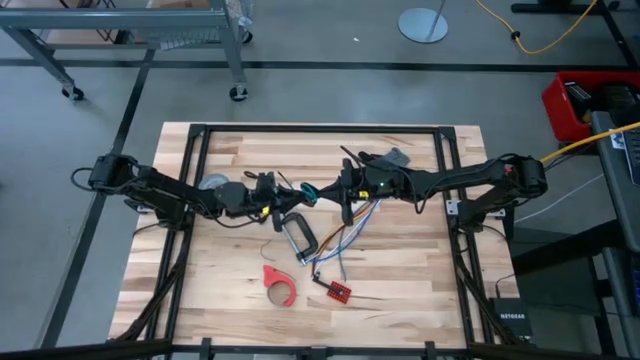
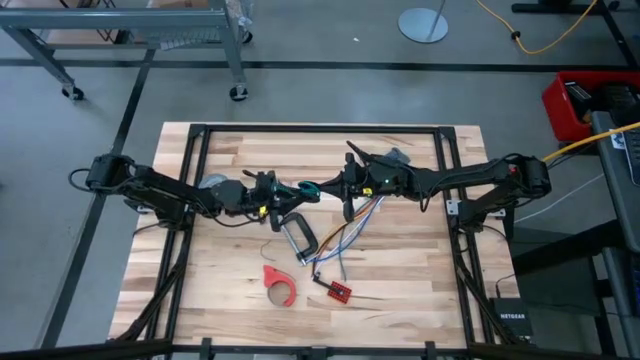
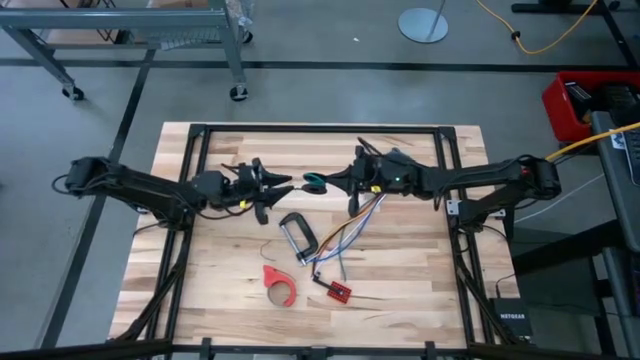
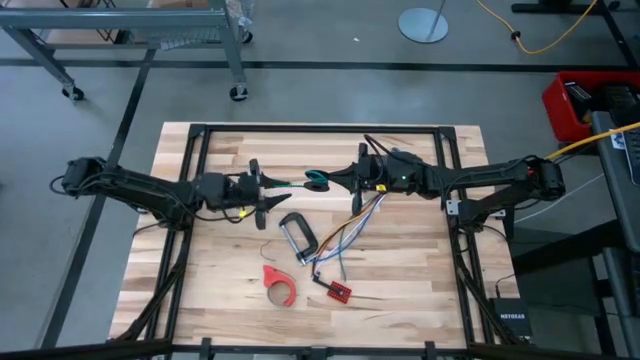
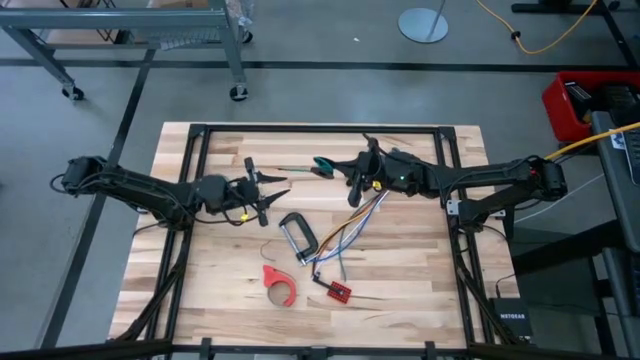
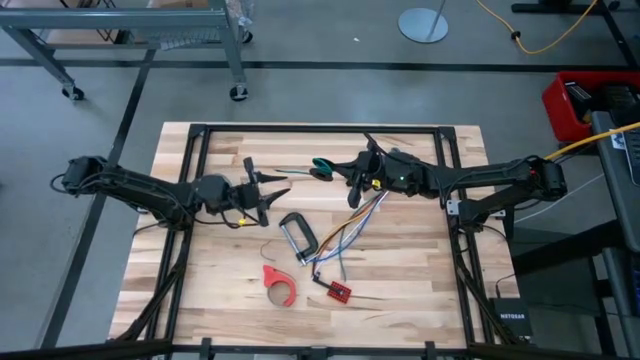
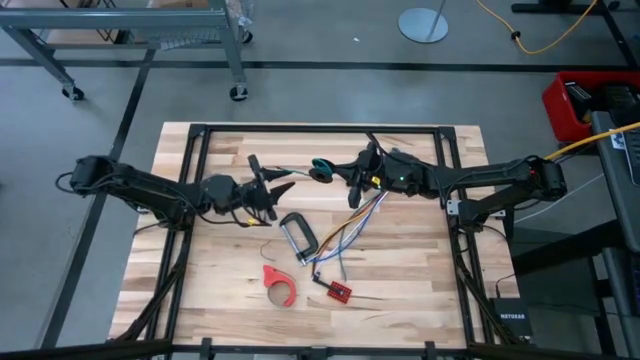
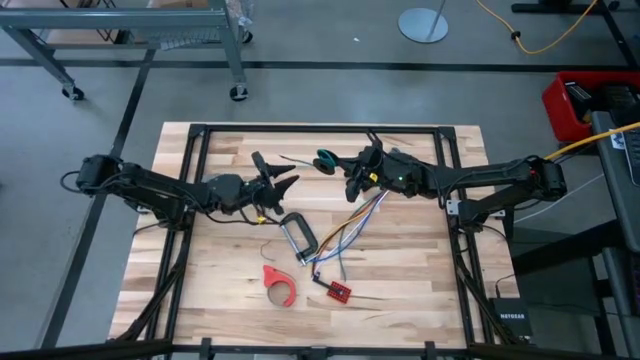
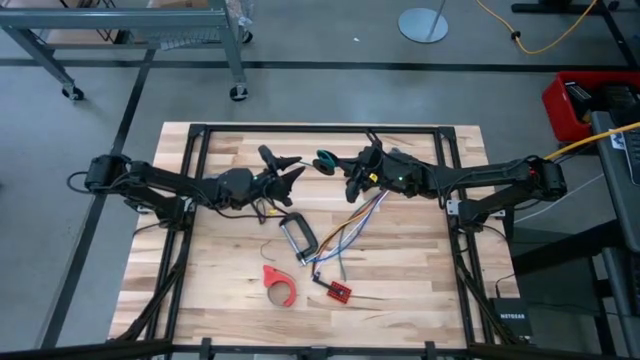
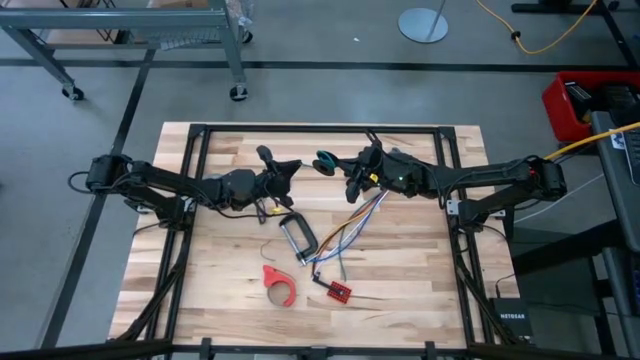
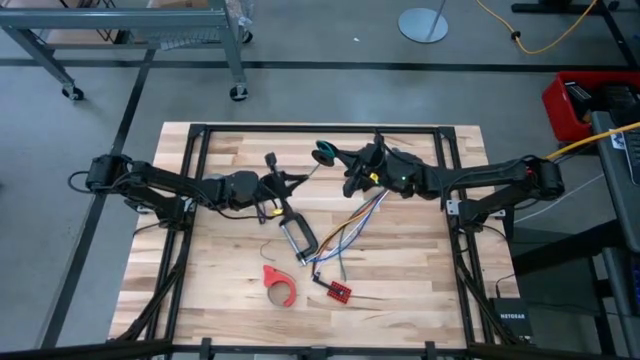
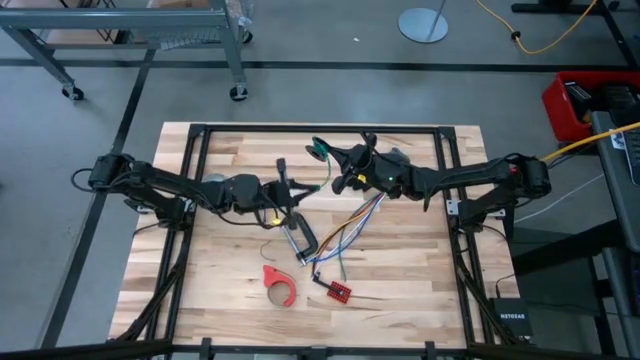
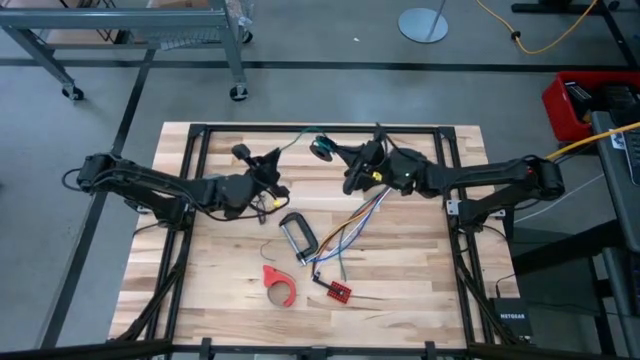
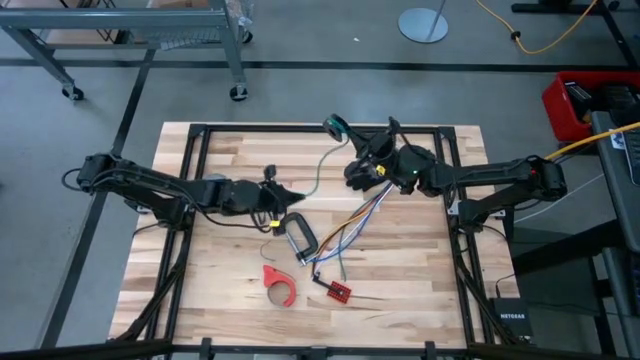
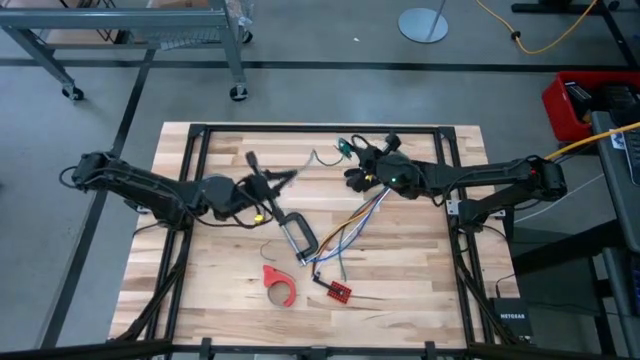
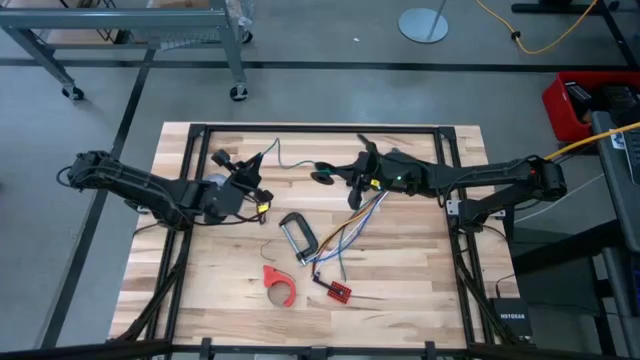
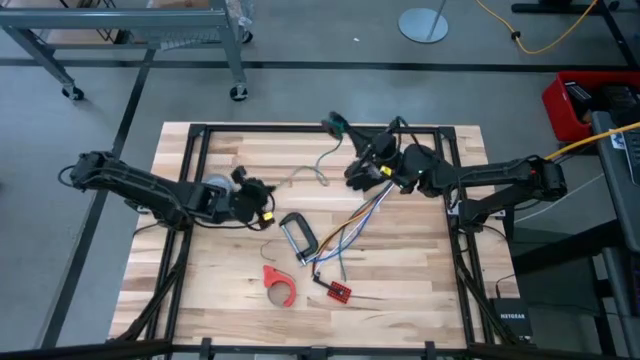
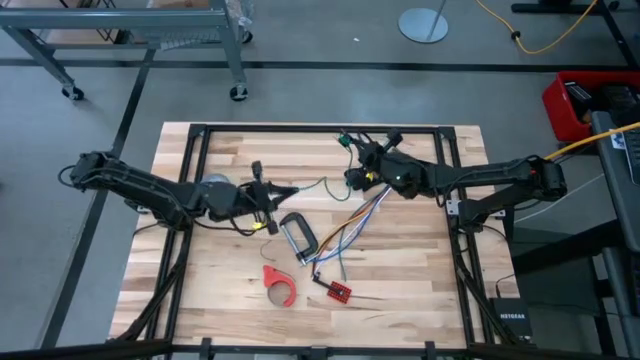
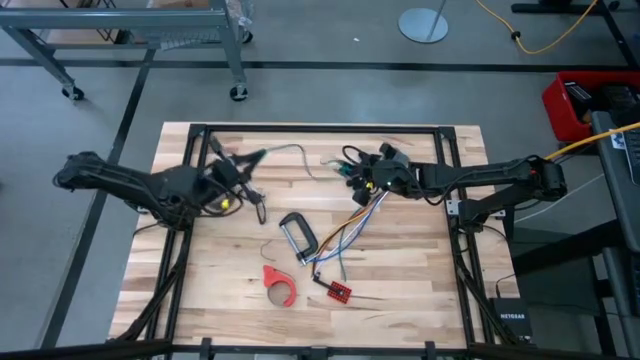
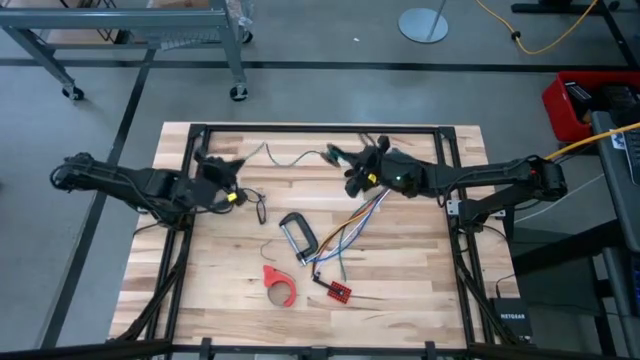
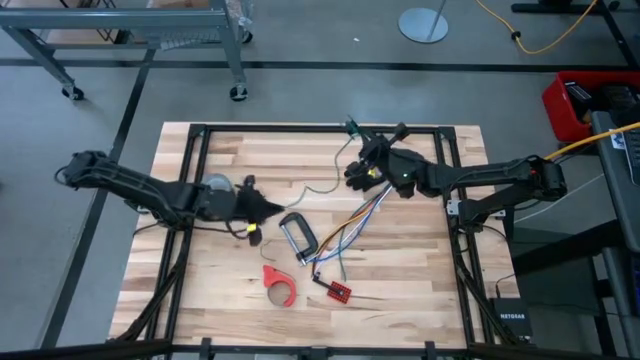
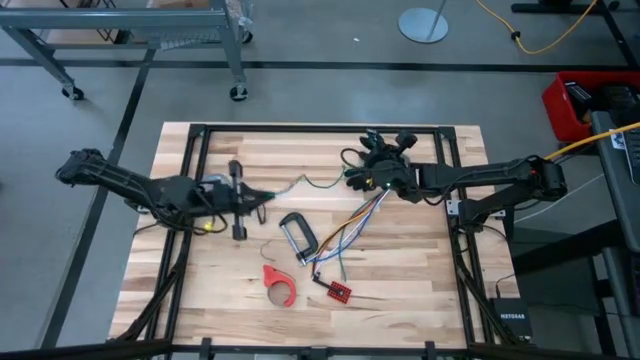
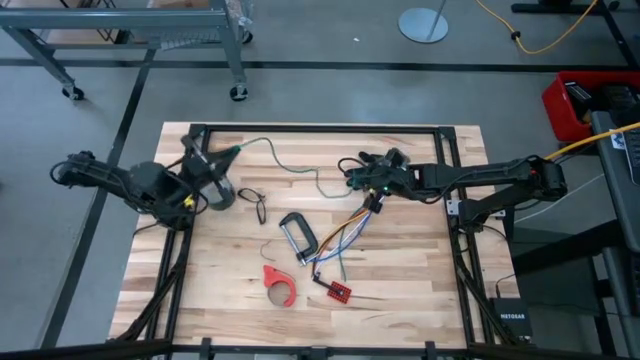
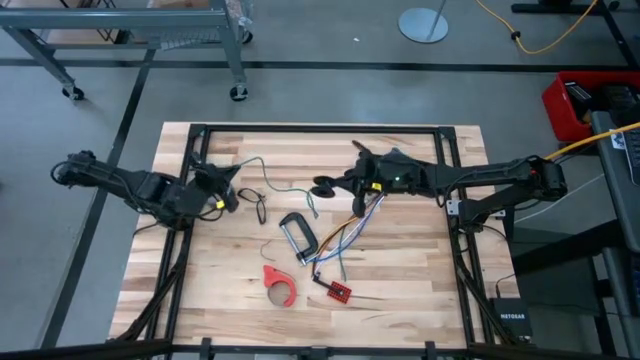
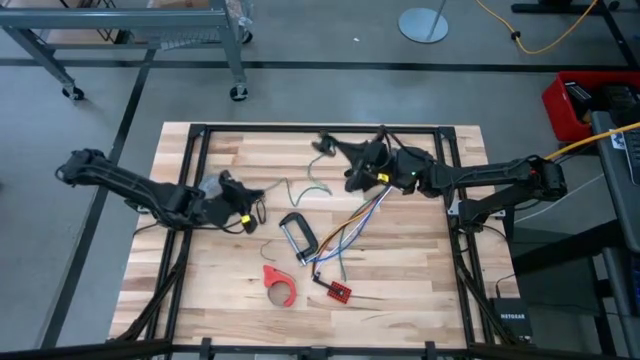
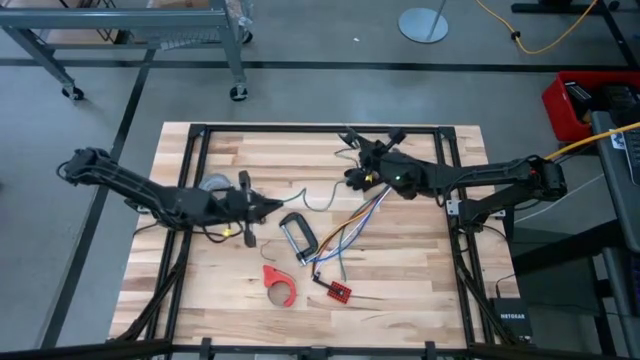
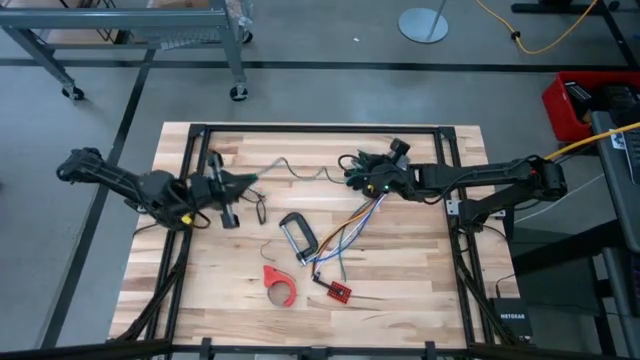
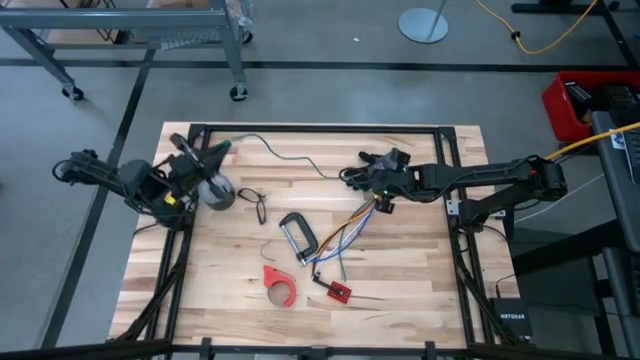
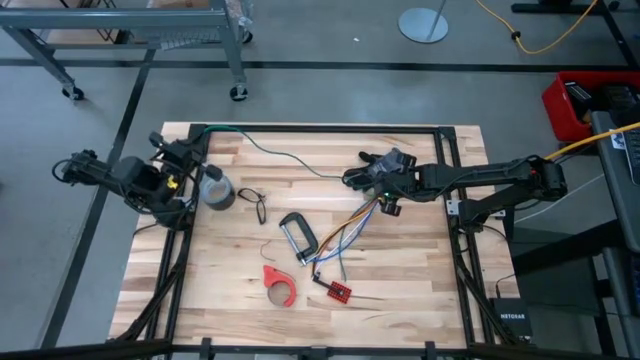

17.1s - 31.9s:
Task: Coil cords
Uncoil the green wire from the spool

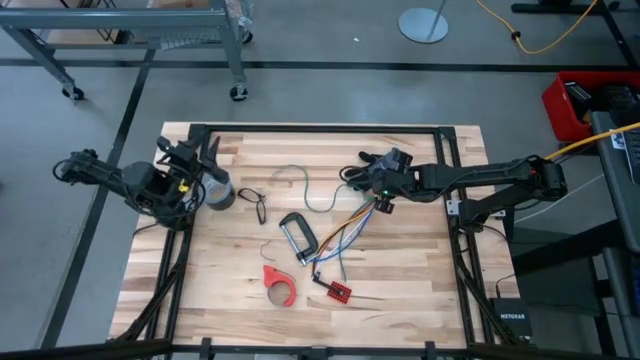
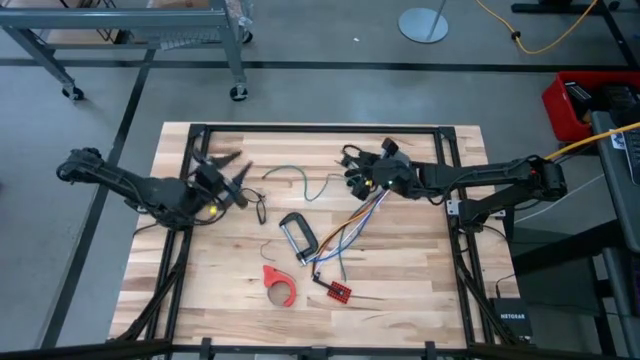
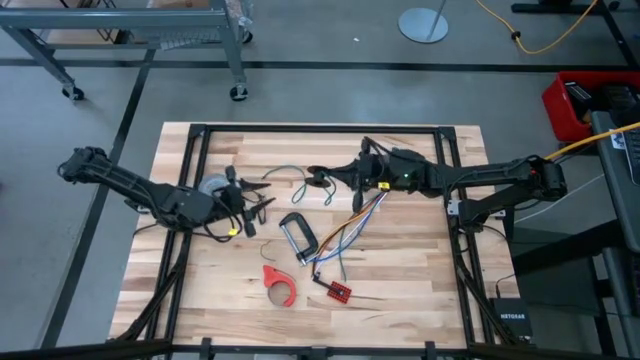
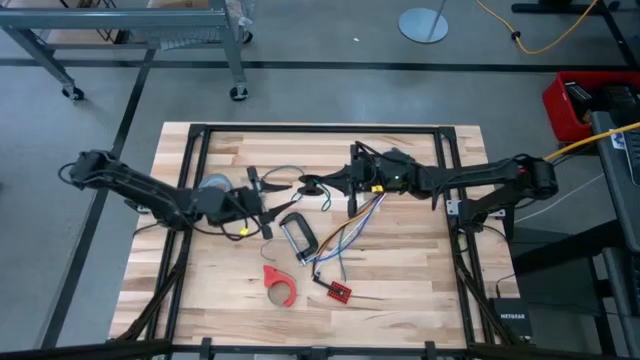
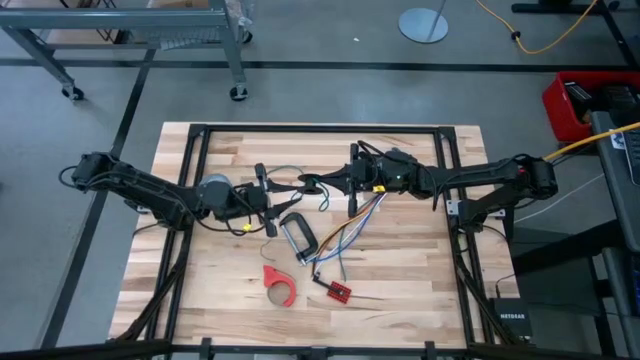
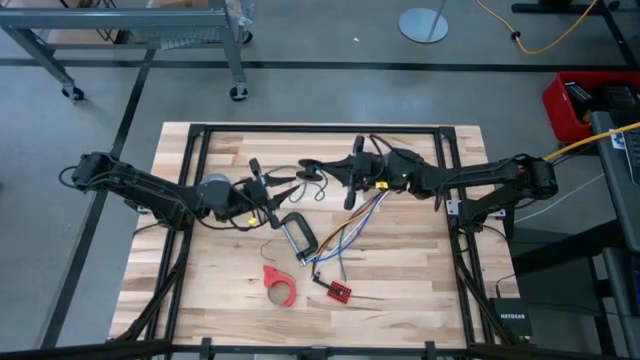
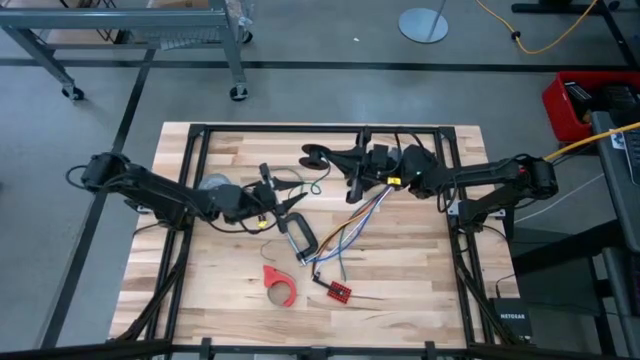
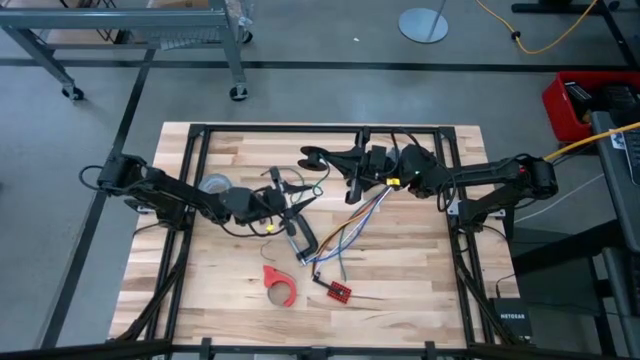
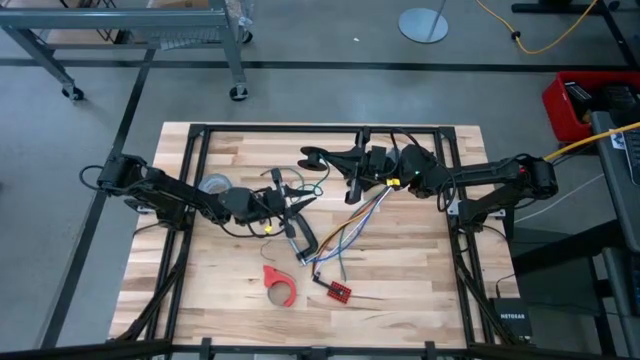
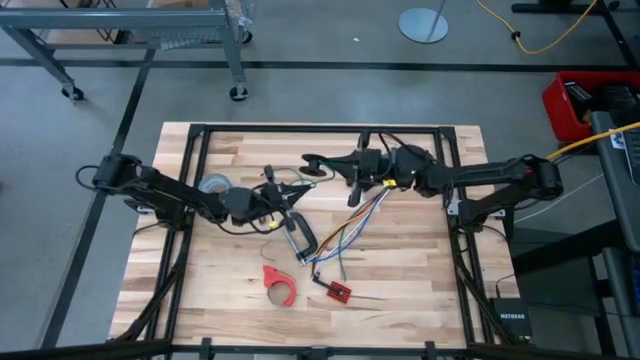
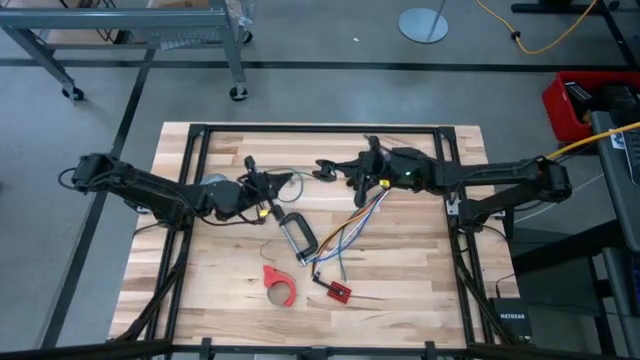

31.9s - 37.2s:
Coil the green wire around the spool

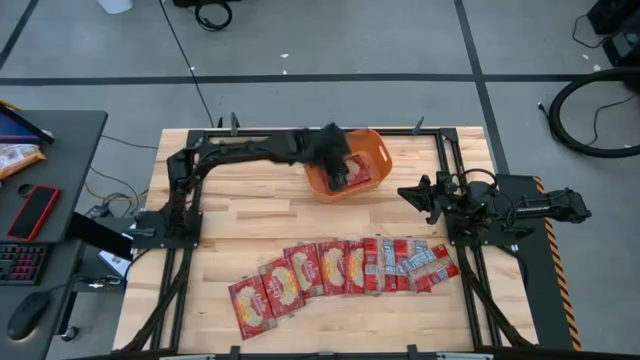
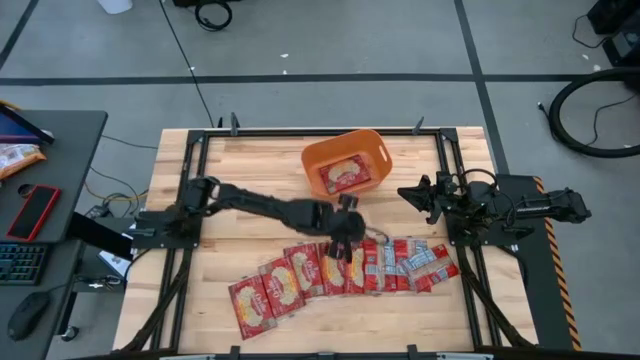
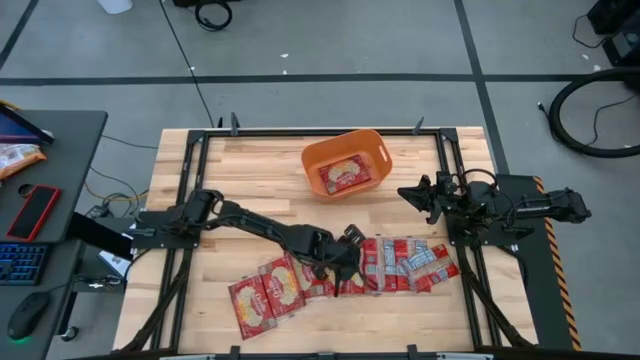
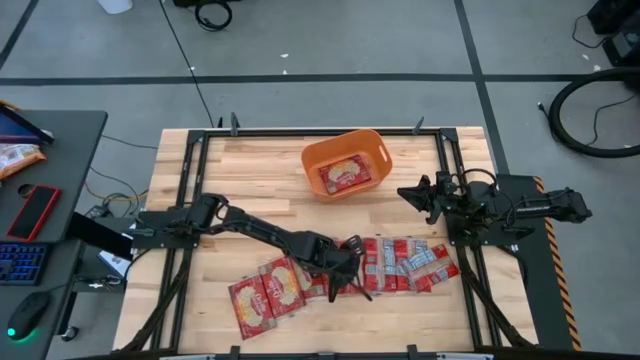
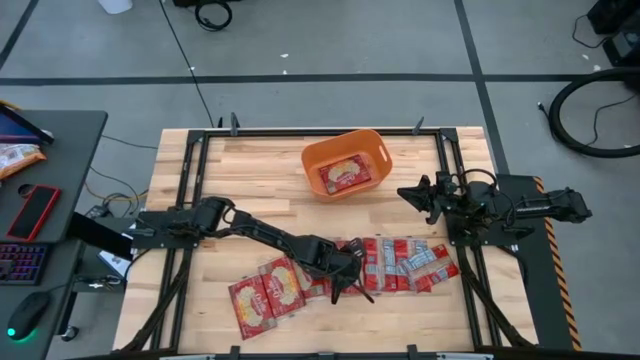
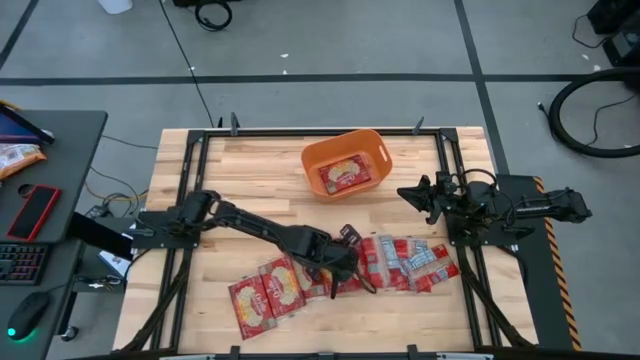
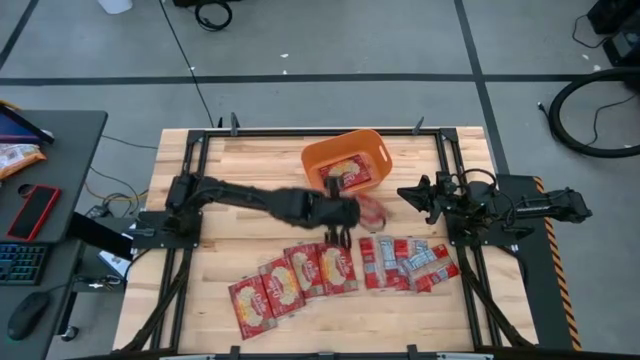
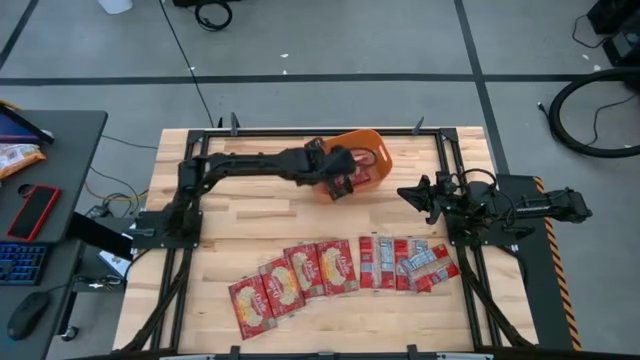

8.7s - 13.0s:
Task: Sort popcorn bags into baskets
Put the red popcorn bag into the orange bin
